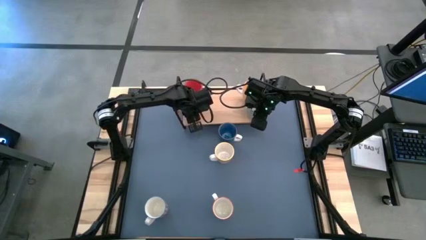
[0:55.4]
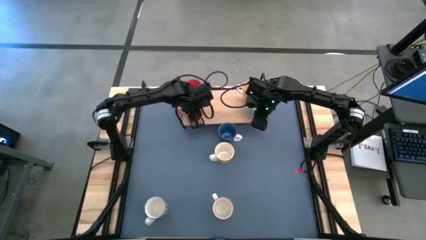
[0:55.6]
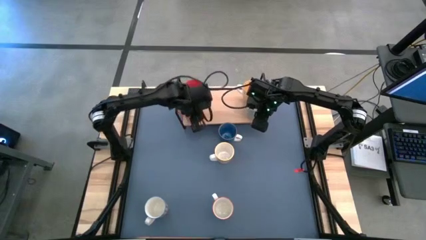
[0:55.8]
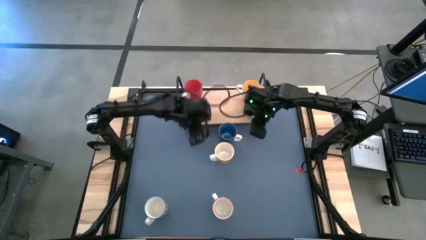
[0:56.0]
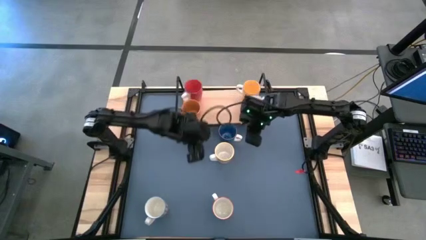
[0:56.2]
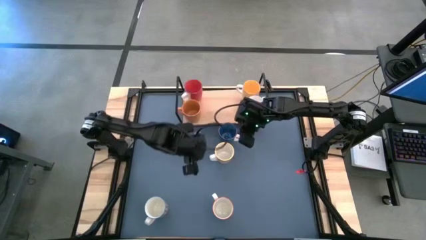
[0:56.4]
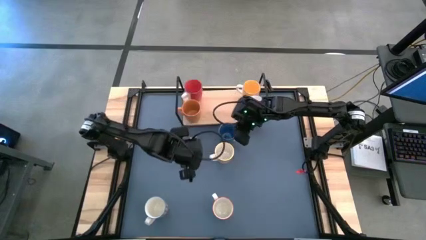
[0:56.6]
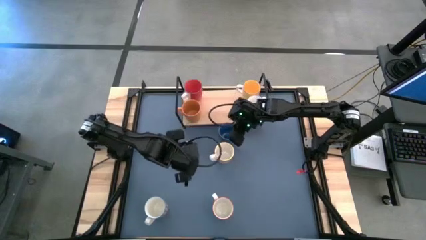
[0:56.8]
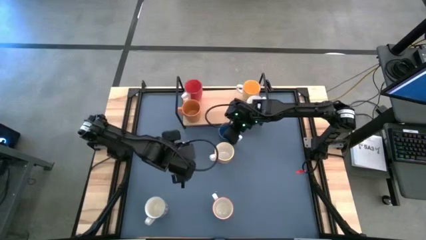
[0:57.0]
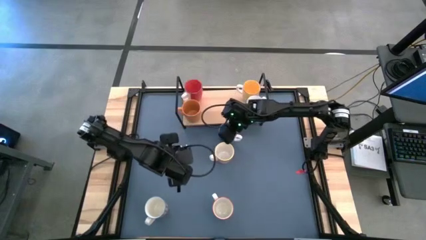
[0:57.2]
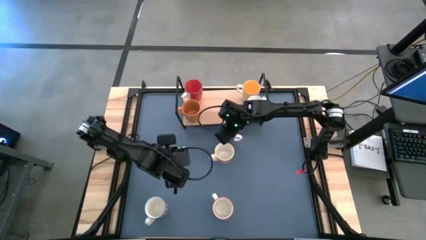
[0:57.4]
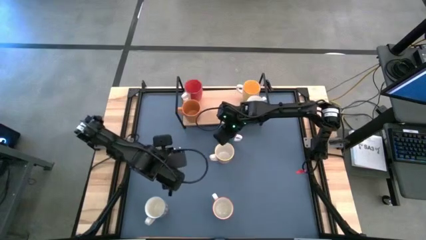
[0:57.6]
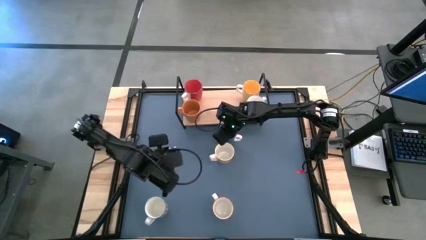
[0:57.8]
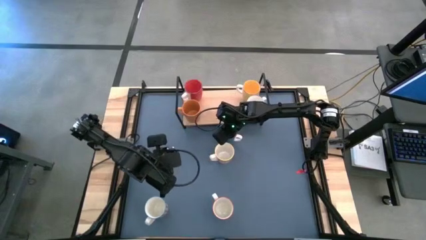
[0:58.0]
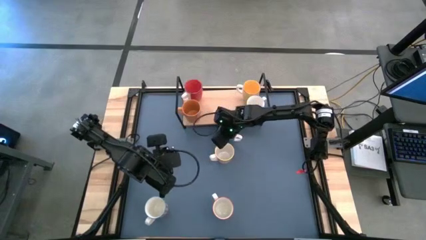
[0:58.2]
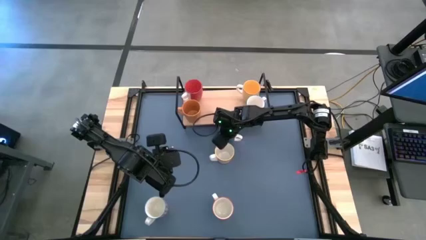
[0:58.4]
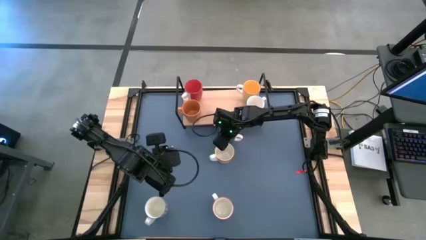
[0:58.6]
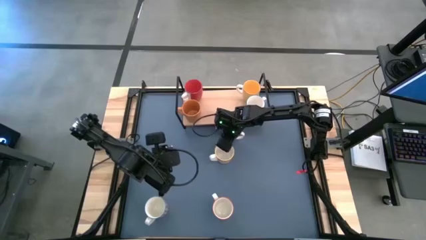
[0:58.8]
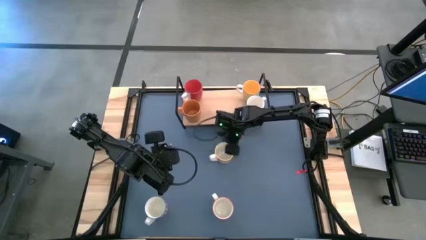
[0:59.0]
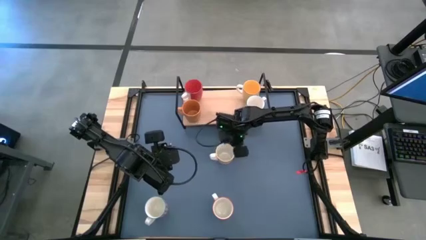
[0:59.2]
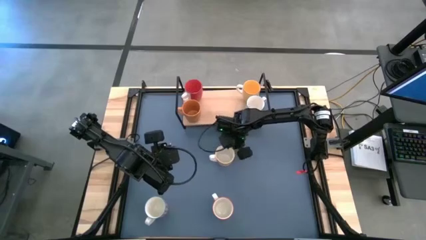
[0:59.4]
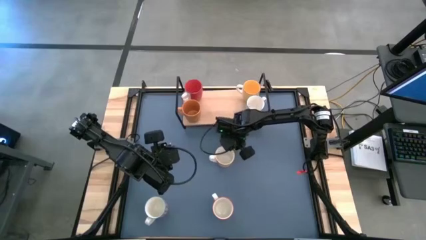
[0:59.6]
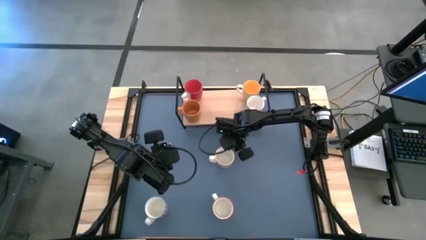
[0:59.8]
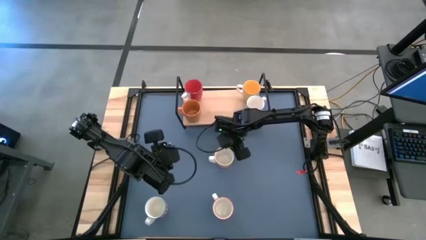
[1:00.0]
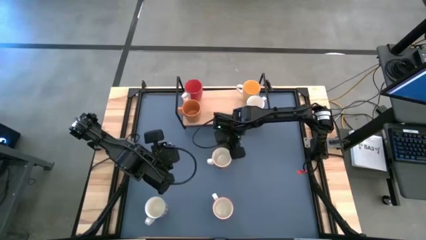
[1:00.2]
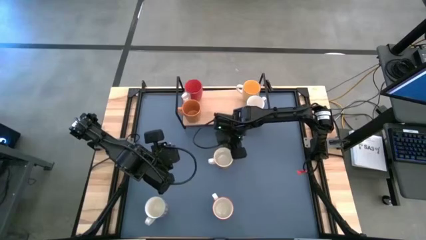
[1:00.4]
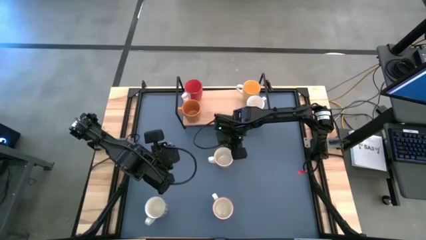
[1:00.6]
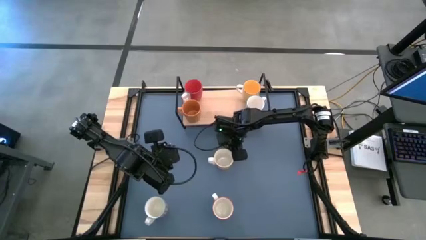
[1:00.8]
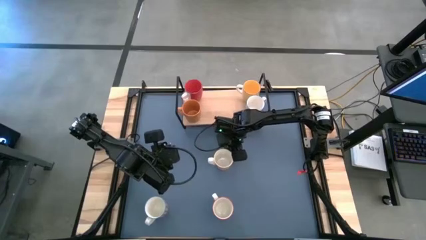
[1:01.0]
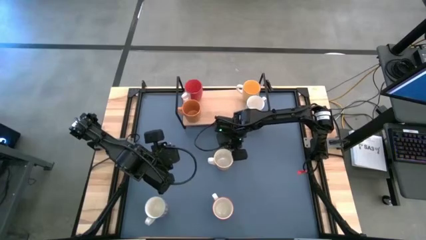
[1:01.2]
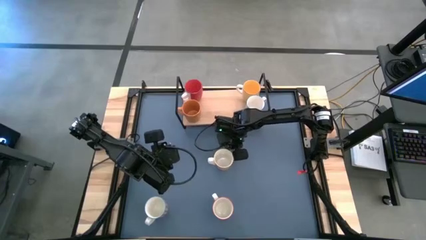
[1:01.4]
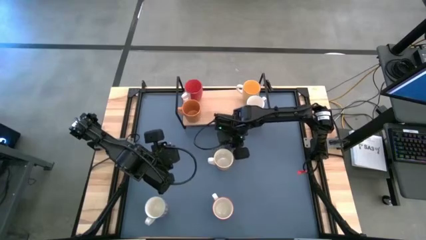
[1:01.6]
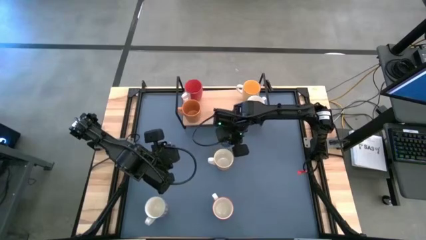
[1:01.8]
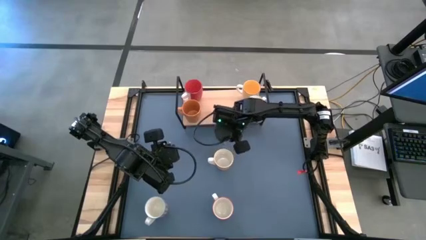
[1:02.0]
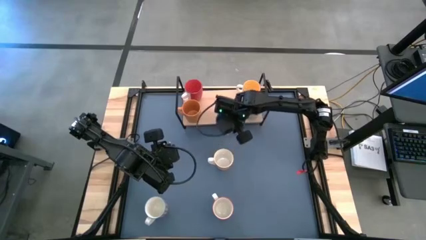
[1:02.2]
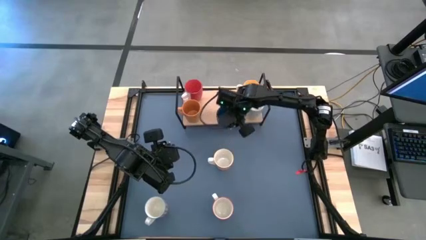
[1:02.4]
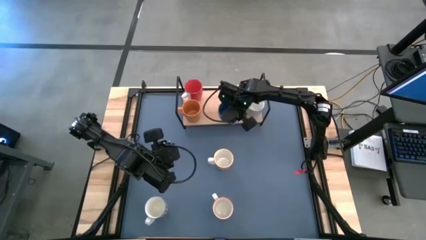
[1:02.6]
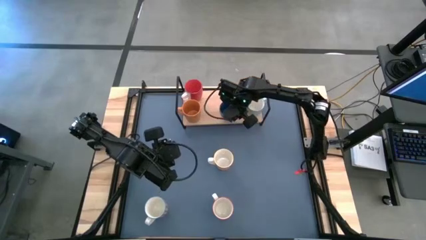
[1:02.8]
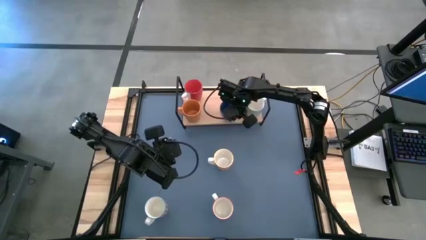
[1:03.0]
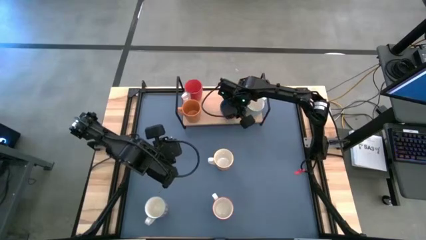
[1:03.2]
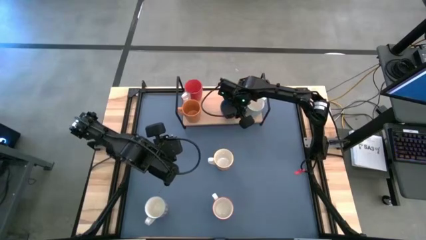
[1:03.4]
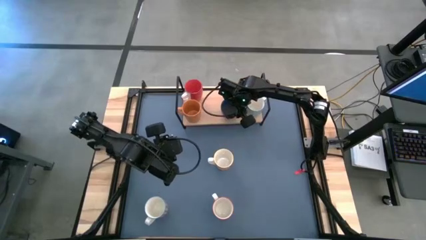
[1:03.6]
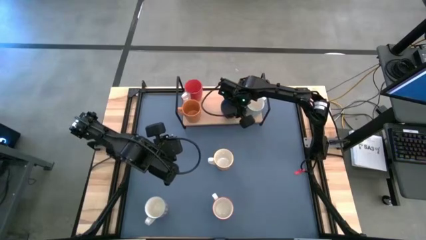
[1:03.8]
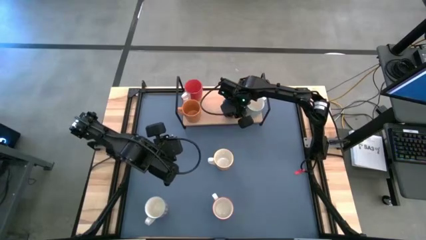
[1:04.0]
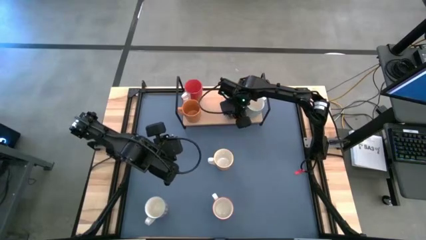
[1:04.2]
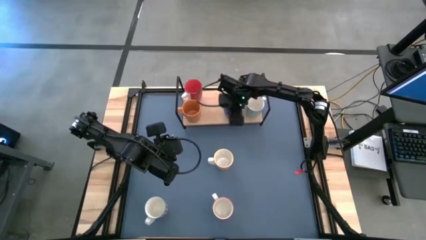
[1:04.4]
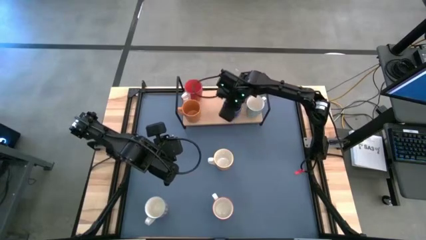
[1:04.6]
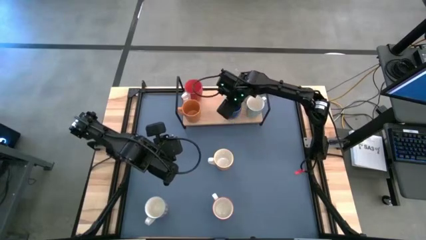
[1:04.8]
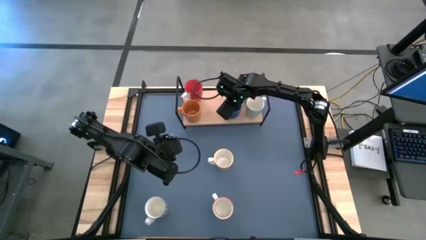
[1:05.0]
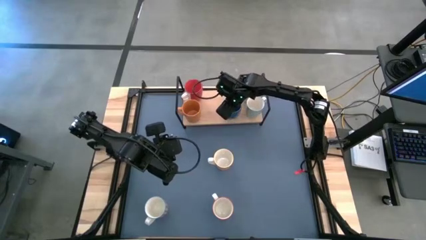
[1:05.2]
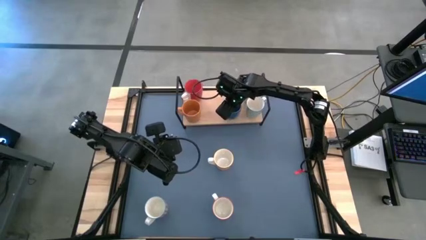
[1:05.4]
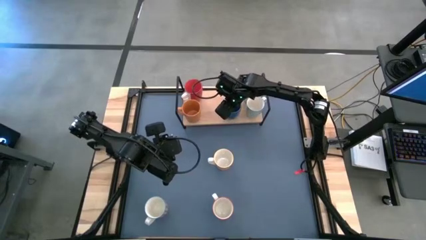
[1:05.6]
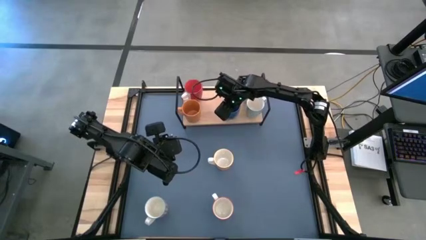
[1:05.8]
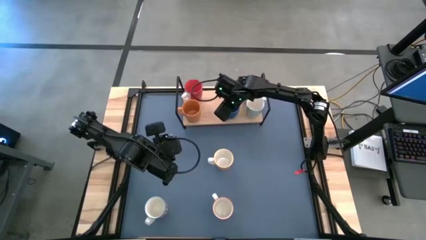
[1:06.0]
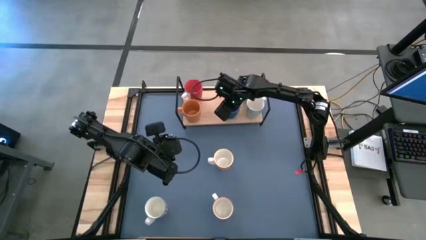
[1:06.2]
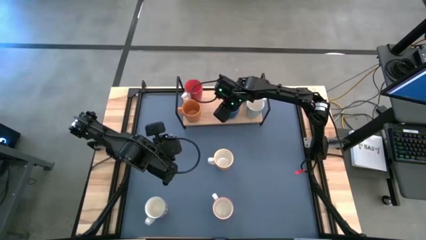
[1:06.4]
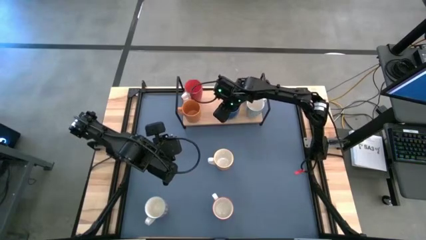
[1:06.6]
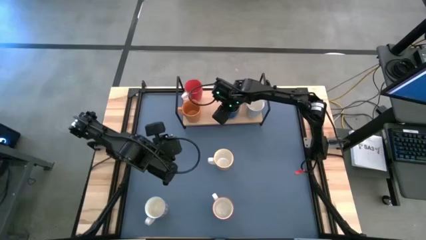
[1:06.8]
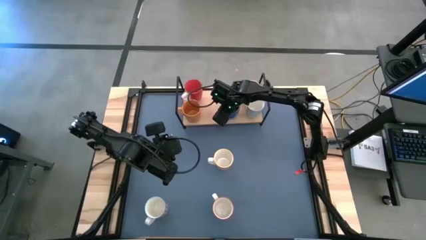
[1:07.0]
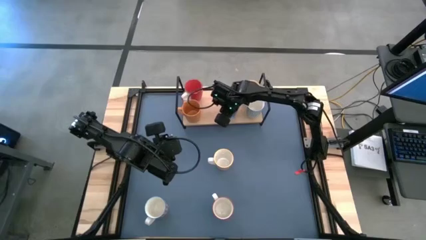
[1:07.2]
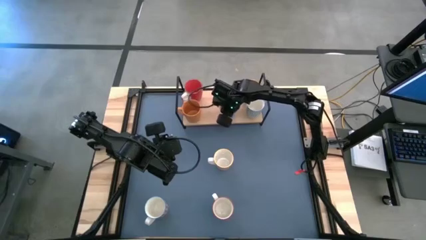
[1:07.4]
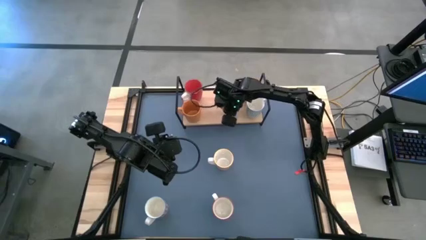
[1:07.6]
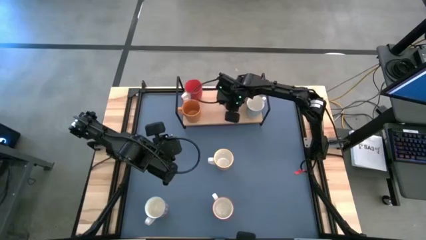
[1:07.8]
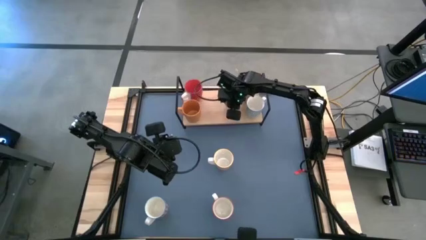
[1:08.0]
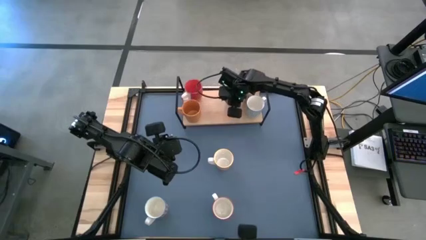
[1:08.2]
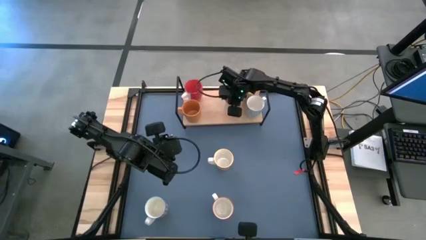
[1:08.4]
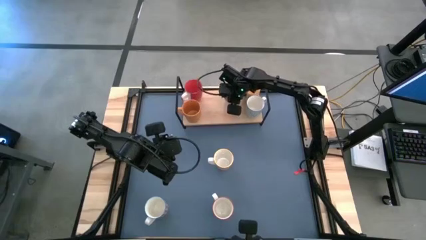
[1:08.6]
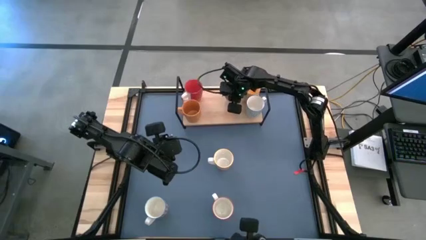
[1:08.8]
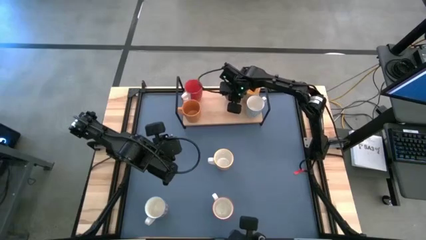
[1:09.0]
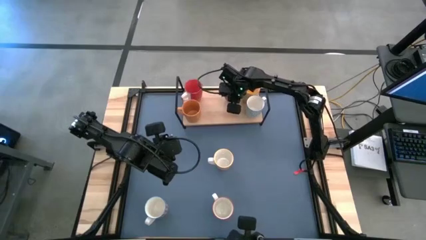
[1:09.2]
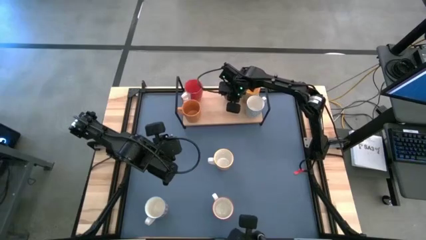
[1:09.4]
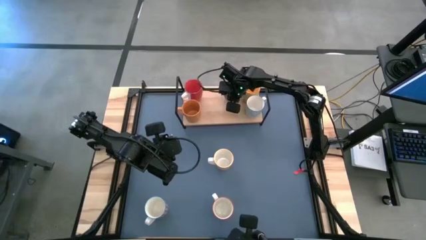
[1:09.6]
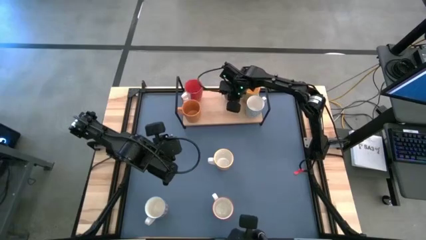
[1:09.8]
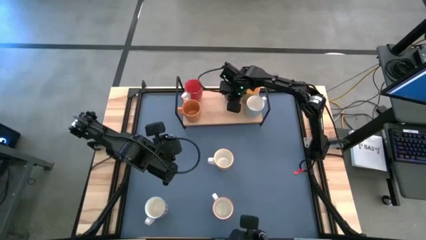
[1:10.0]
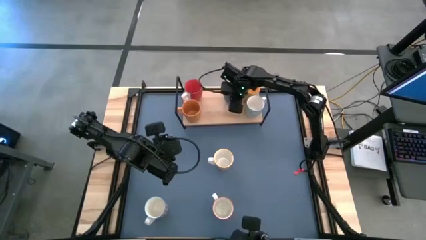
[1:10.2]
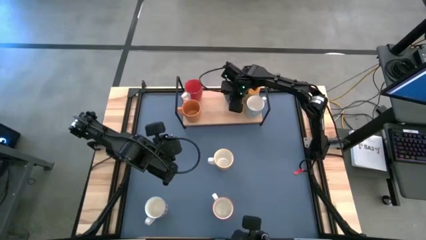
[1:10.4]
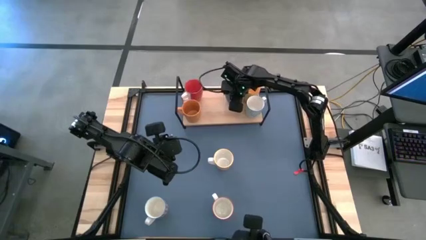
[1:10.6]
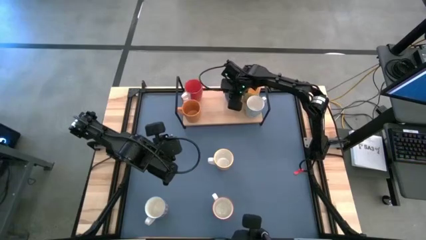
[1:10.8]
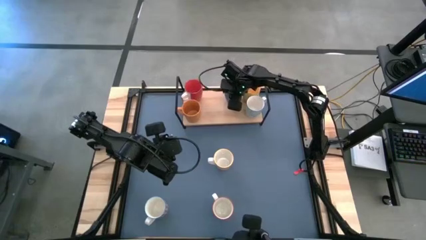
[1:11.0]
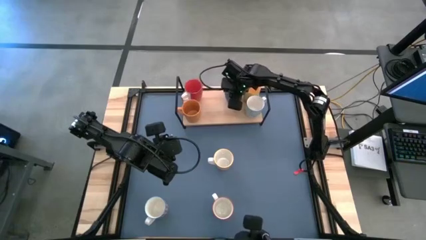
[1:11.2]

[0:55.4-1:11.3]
Task: Place coffee mugs
Put the blue cup on the shelf

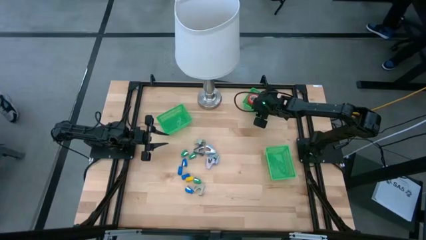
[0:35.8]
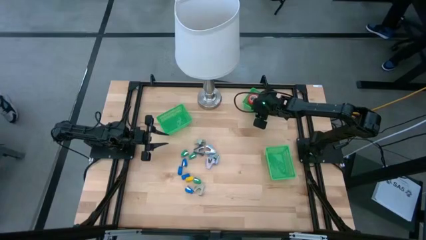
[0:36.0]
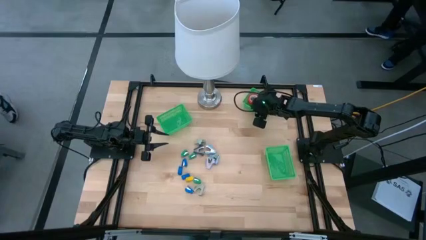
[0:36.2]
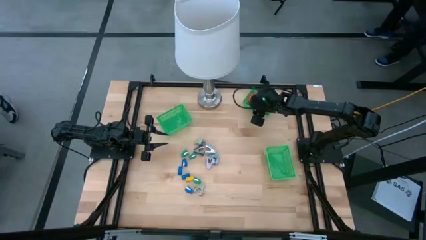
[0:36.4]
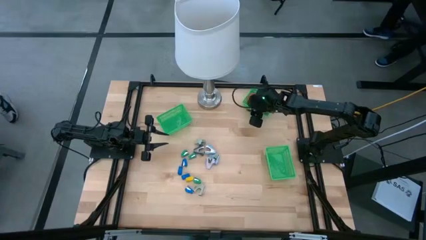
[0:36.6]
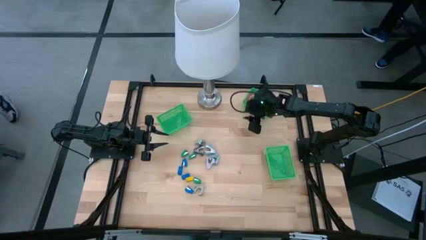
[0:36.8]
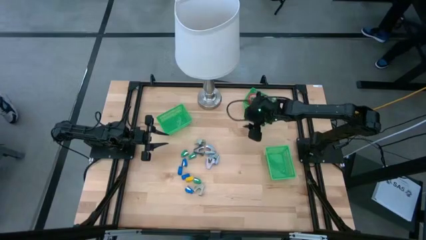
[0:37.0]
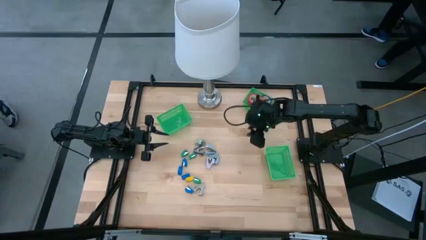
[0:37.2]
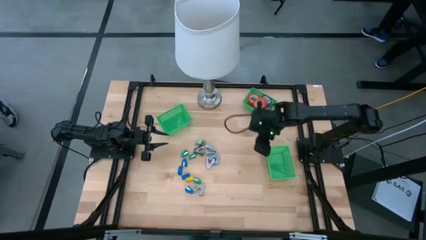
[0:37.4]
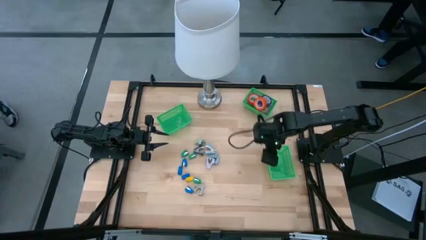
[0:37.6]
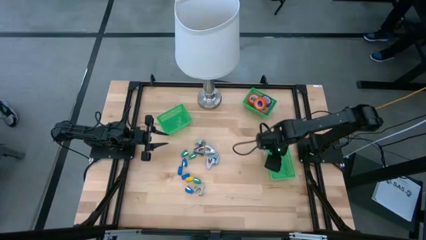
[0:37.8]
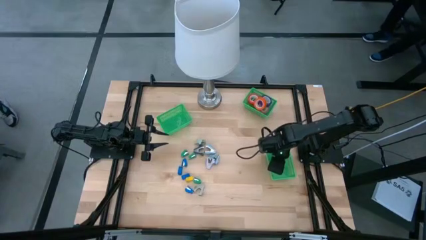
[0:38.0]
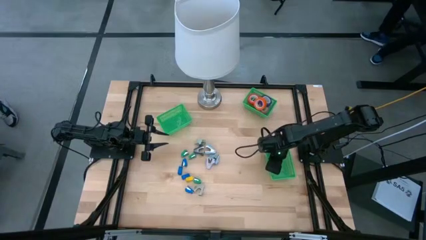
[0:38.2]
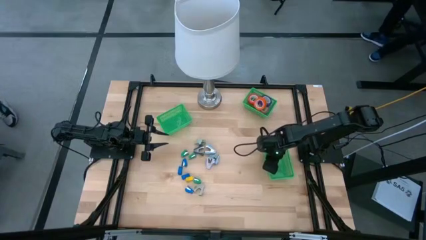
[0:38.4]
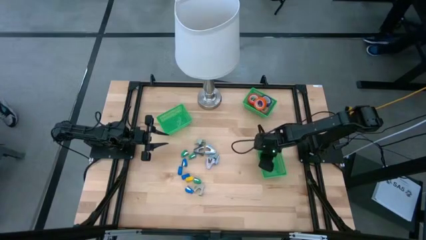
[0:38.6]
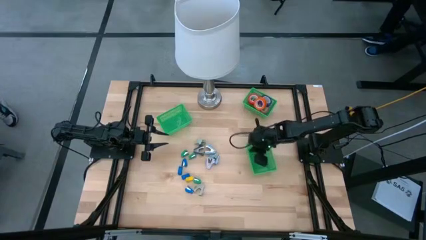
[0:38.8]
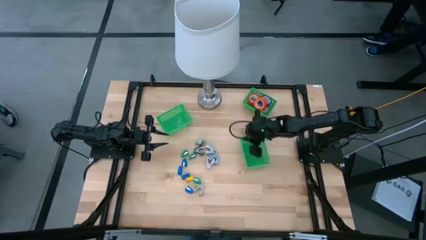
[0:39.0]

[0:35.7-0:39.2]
Task: Pick and place Stapler, Stapler remover, tape
Adjust the bottom right green bin
